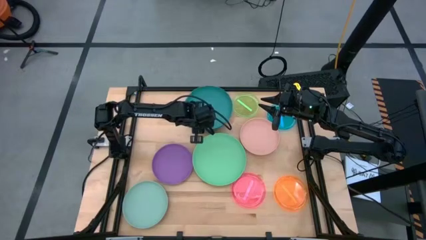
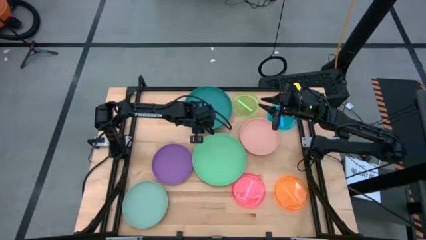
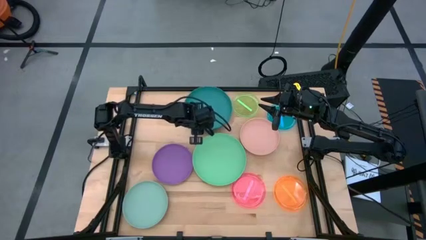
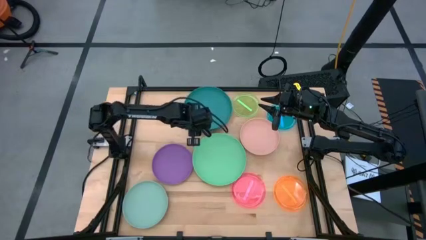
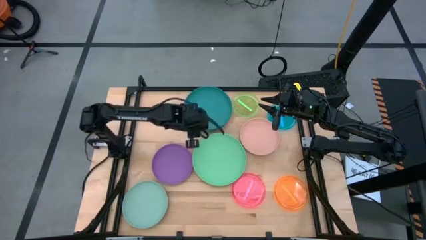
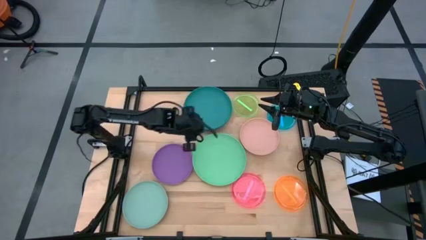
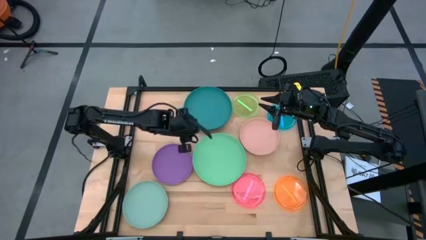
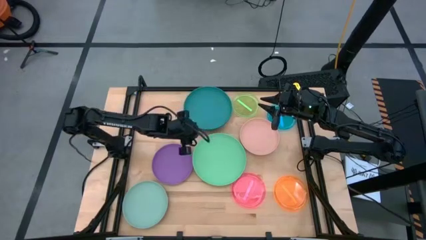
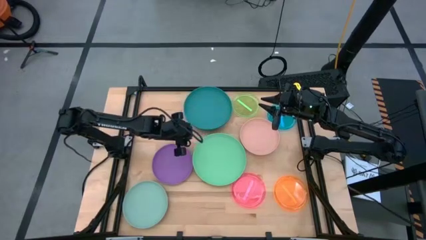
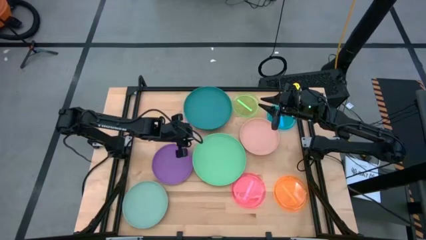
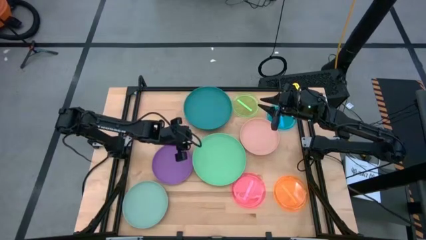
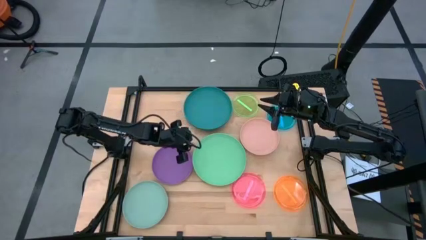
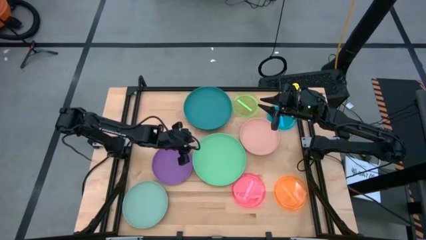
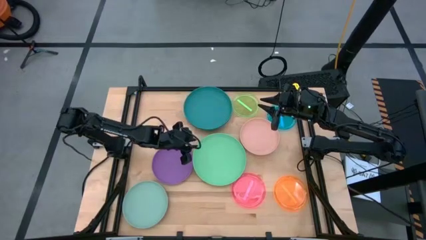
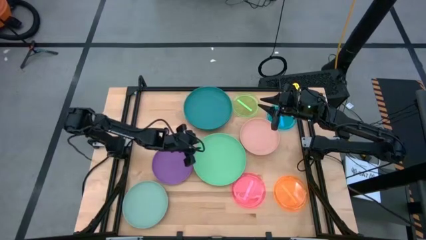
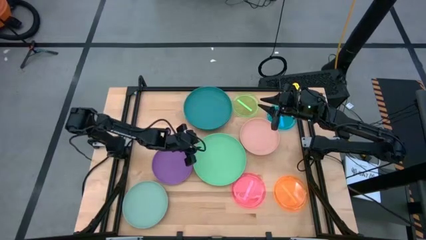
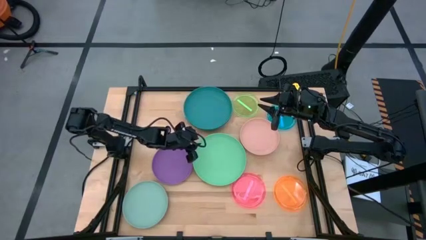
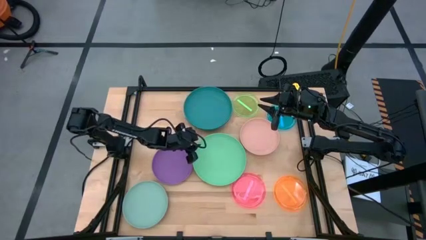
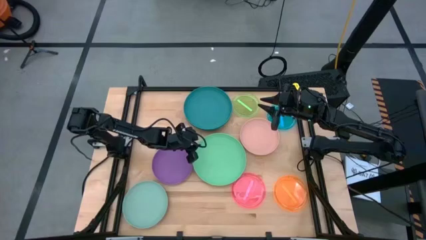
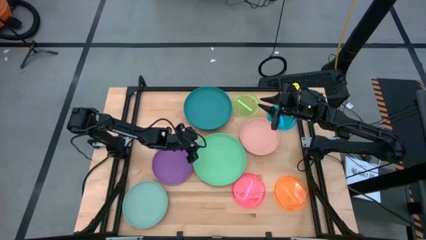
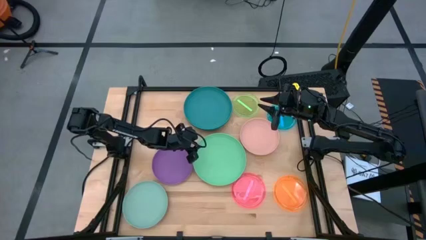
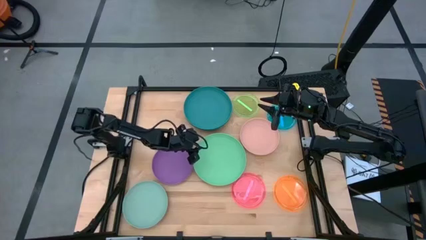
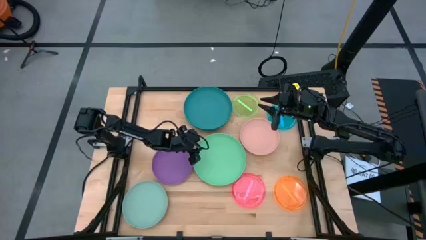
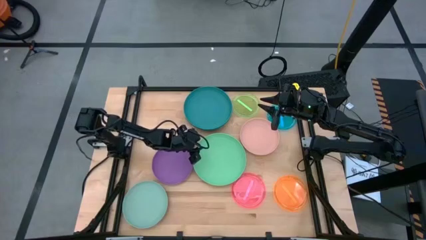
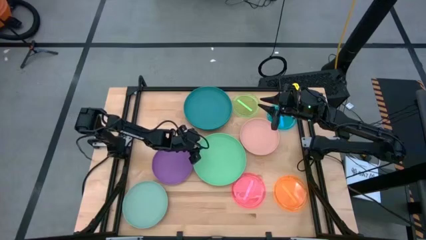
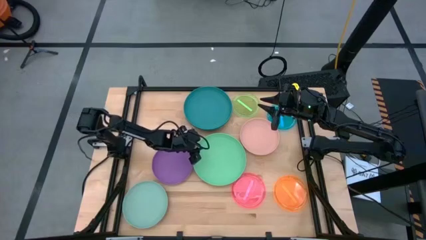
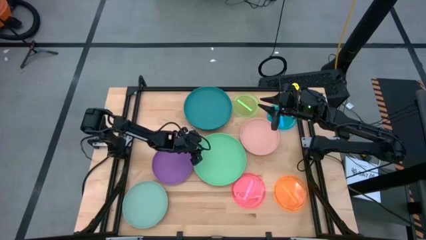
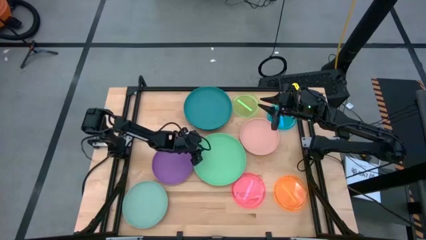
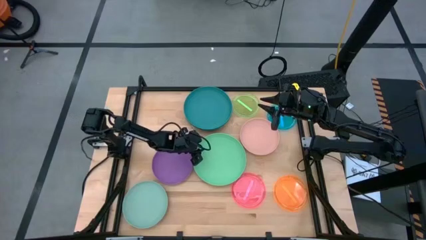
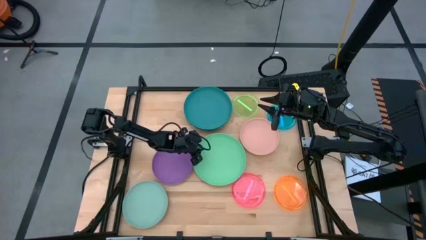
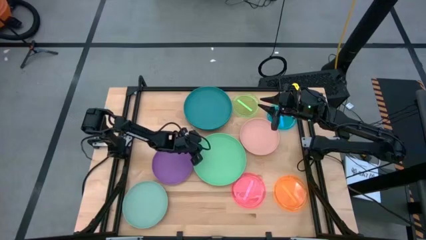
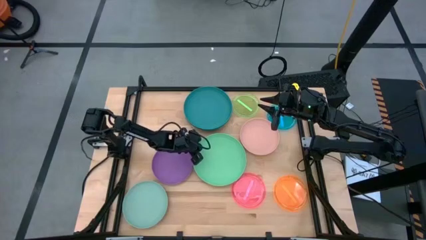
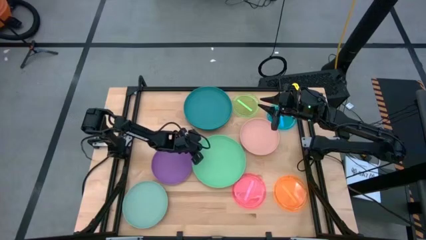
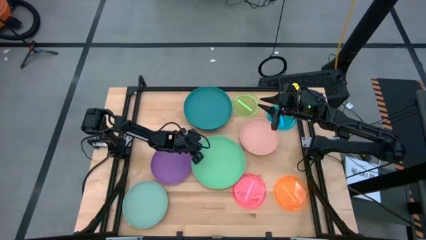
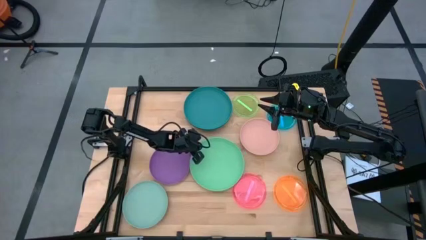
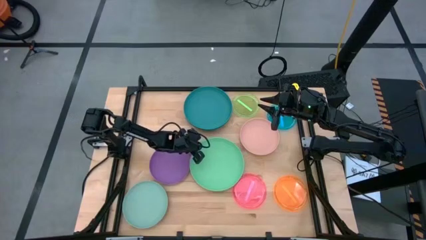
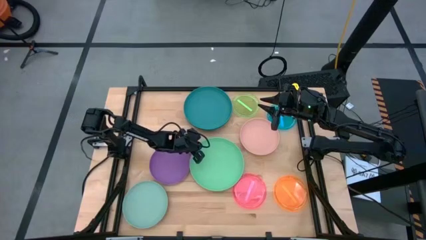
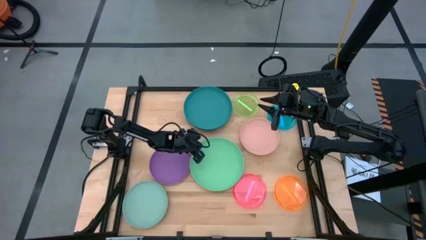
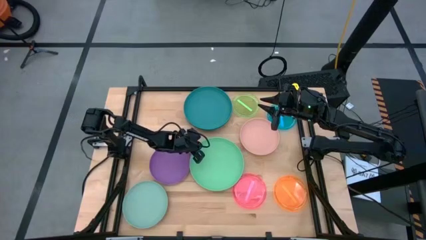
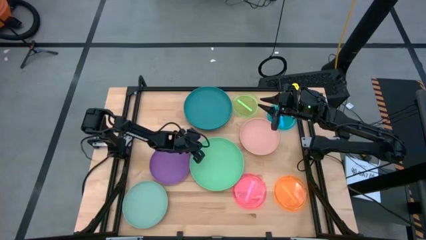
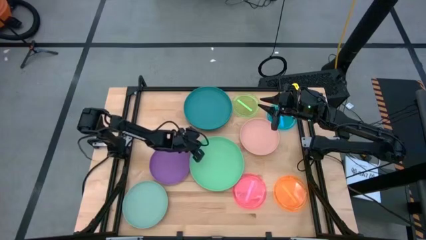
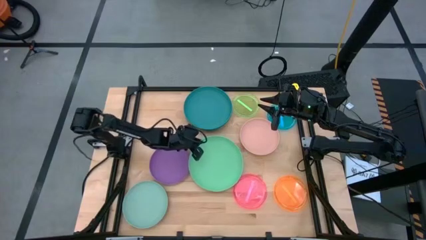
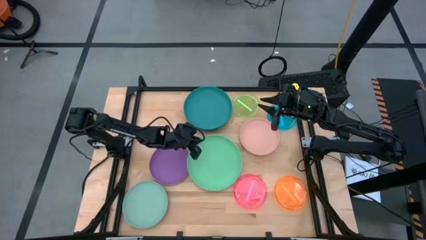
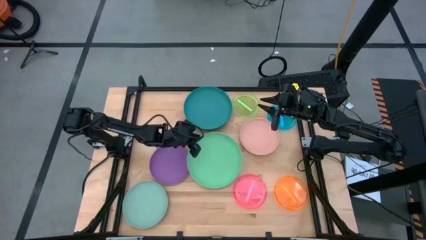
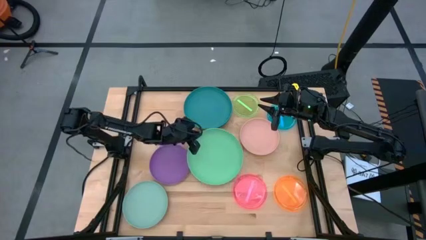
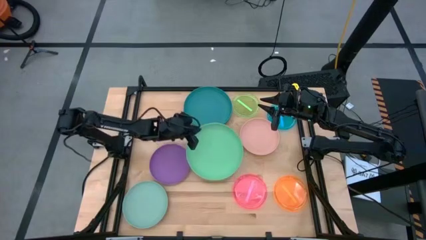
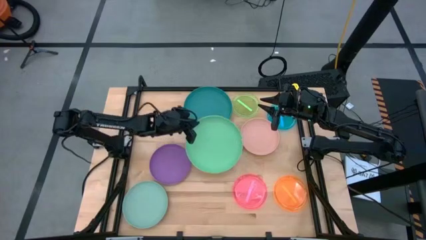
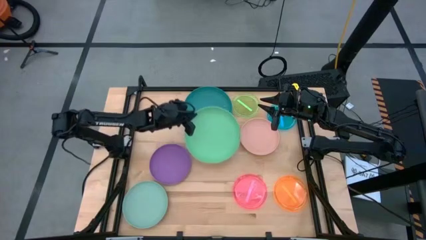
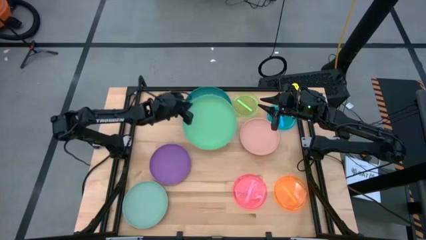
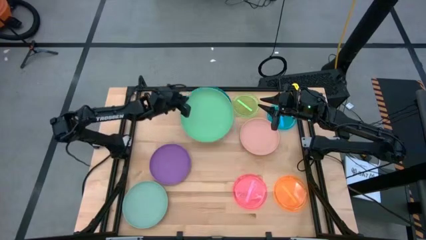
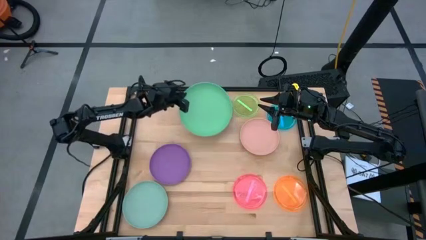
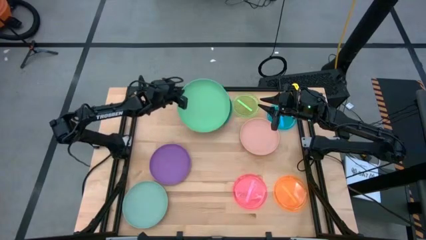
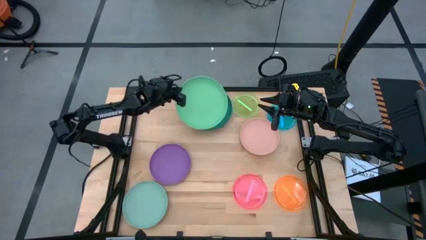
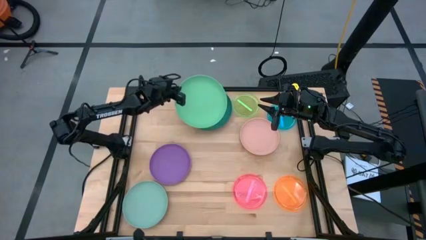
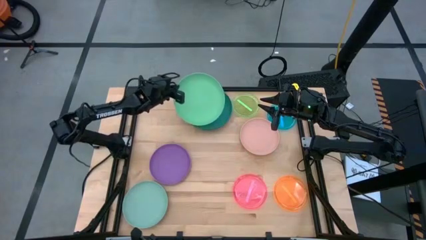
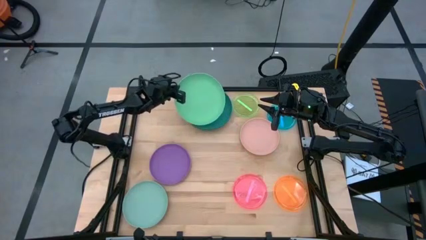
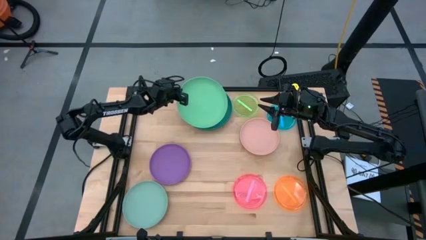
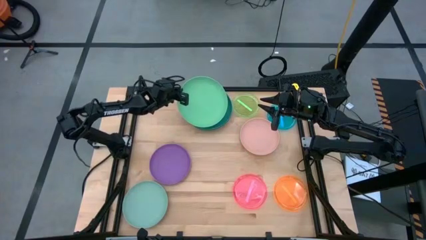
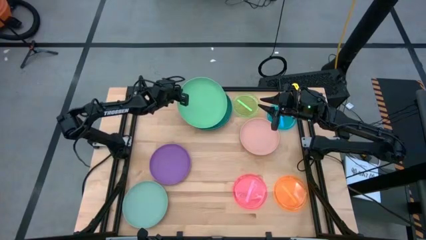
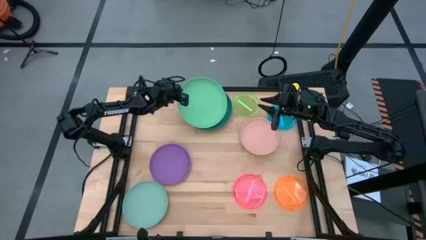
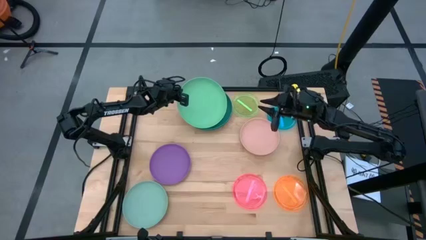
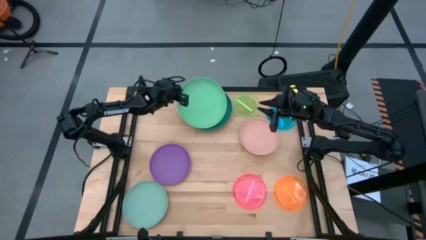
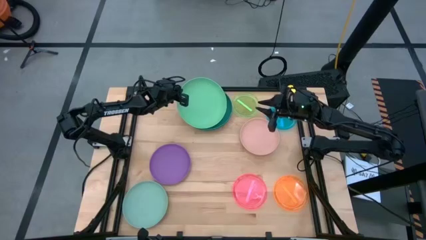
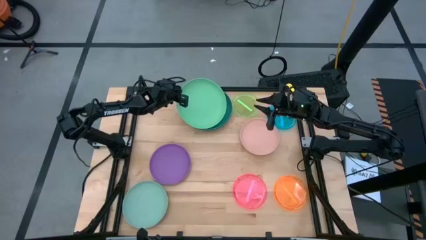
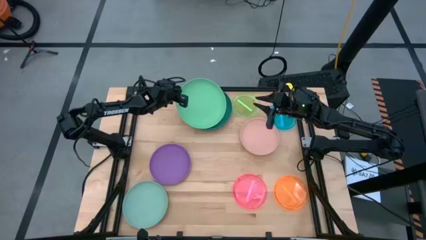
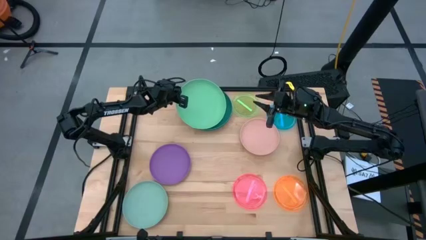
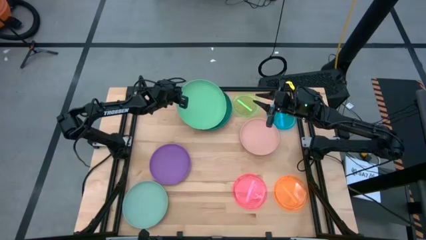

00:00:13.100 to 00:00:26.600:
Task: Stack plastic plates
Stack the green plate on top of the dark blue plate
